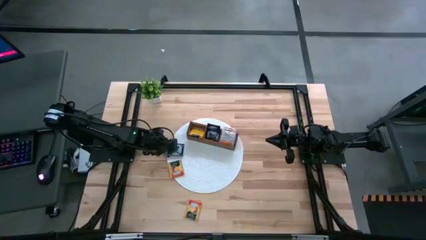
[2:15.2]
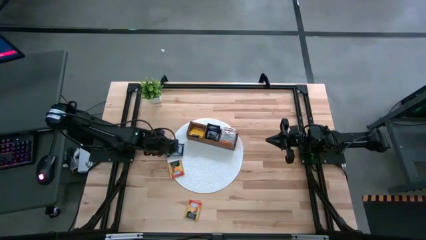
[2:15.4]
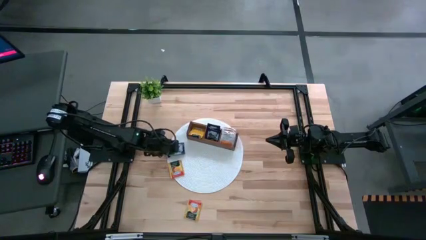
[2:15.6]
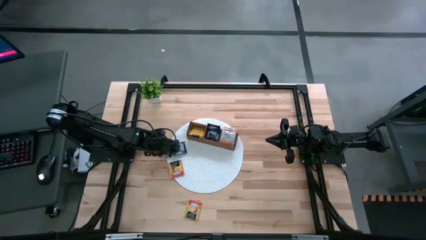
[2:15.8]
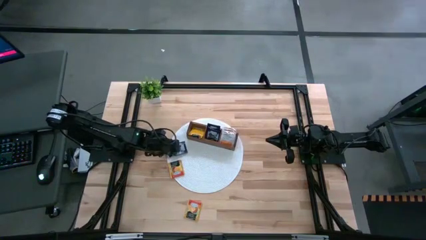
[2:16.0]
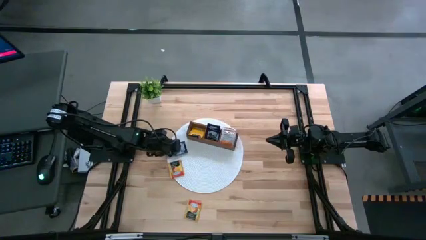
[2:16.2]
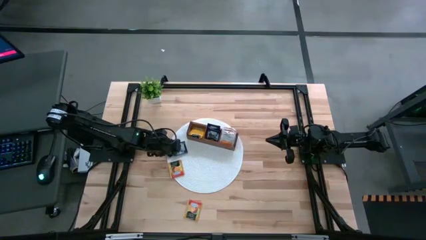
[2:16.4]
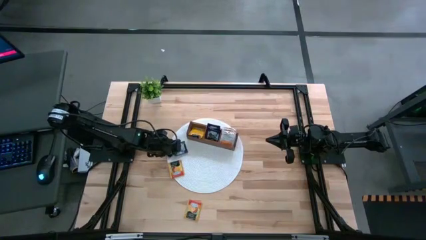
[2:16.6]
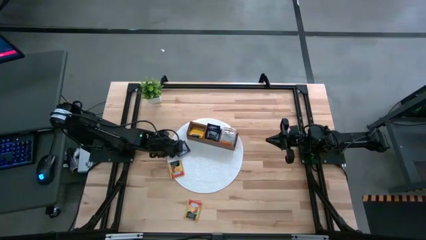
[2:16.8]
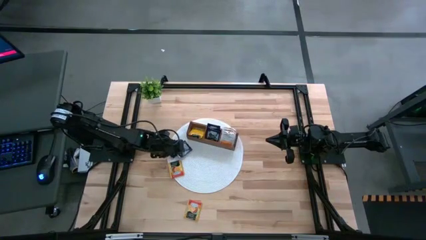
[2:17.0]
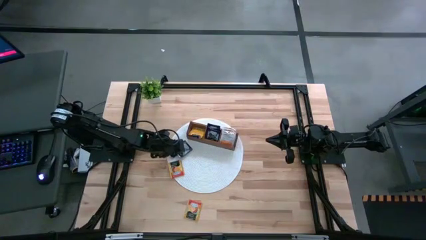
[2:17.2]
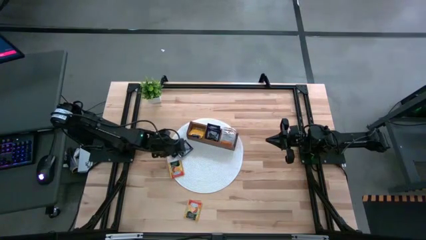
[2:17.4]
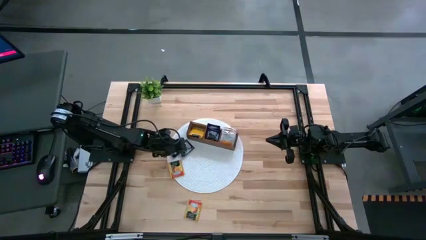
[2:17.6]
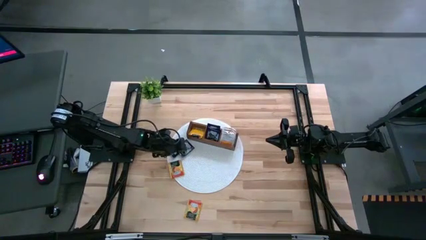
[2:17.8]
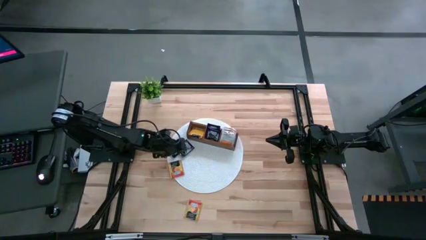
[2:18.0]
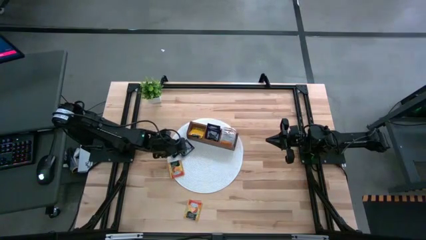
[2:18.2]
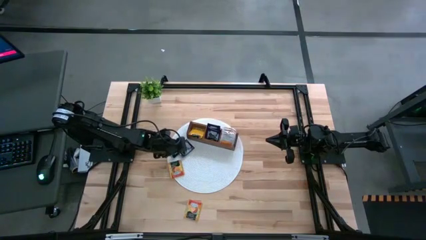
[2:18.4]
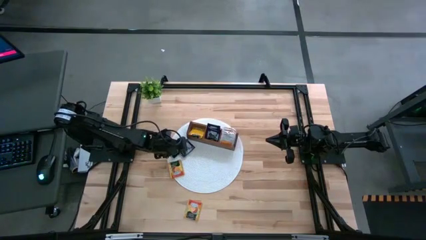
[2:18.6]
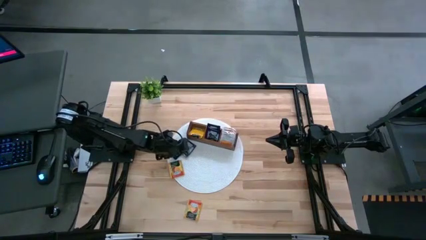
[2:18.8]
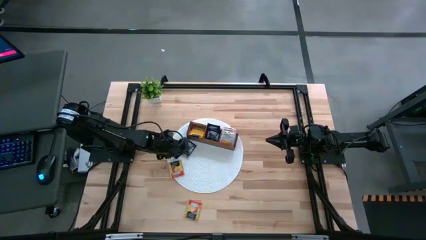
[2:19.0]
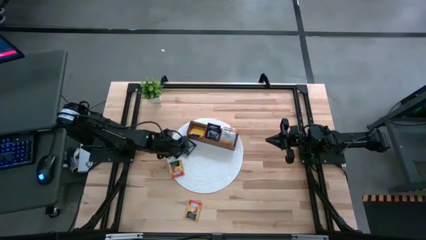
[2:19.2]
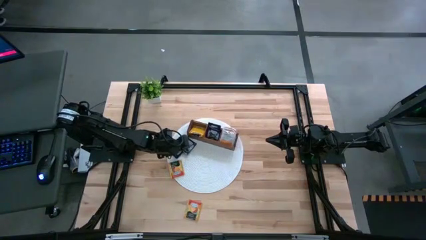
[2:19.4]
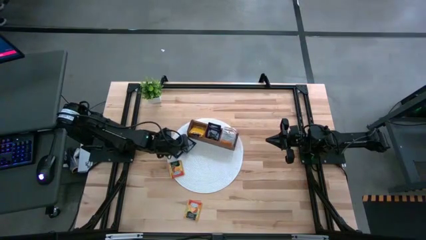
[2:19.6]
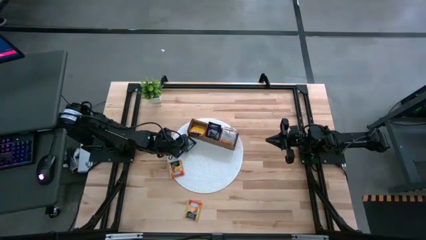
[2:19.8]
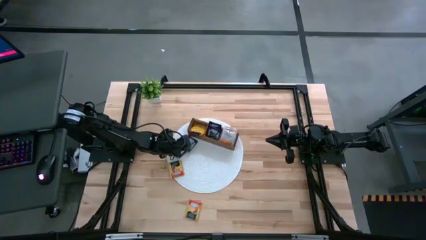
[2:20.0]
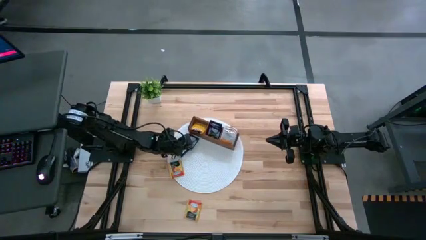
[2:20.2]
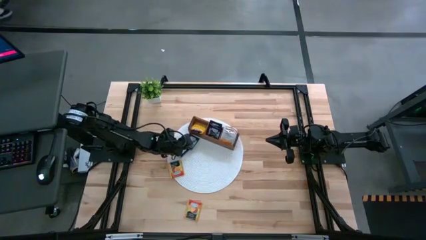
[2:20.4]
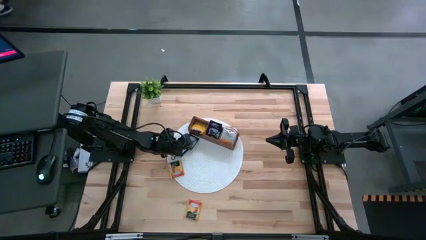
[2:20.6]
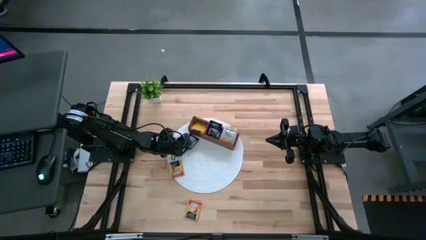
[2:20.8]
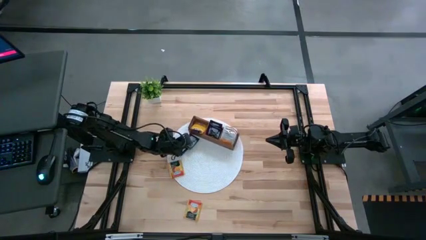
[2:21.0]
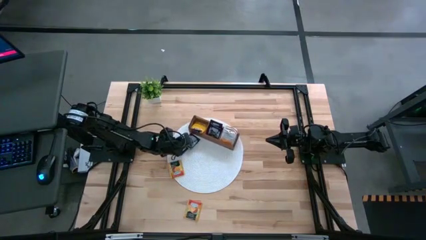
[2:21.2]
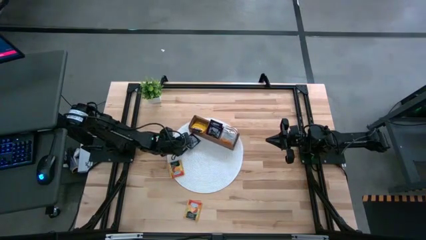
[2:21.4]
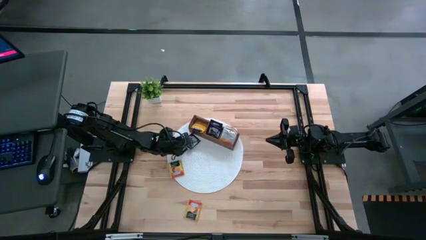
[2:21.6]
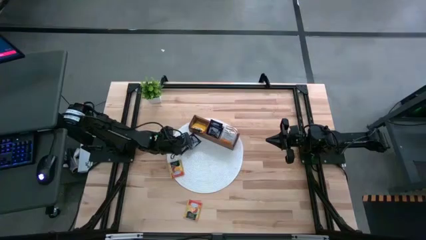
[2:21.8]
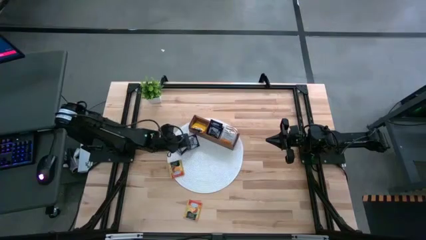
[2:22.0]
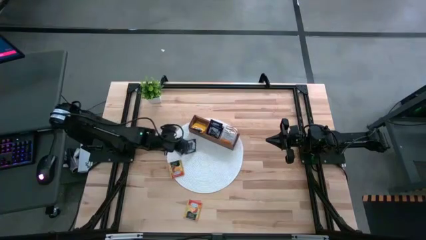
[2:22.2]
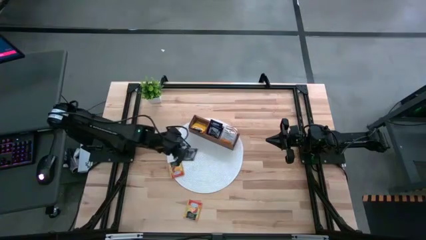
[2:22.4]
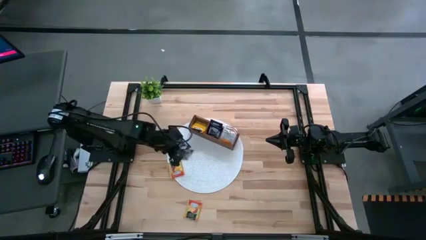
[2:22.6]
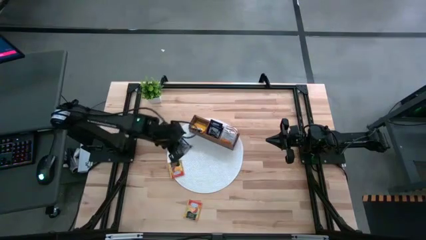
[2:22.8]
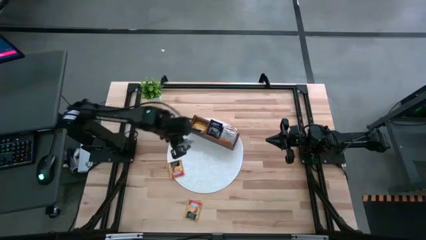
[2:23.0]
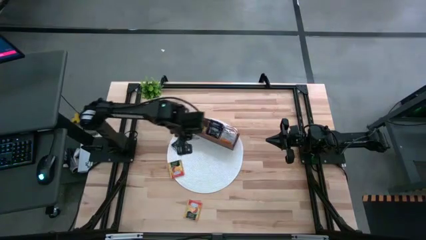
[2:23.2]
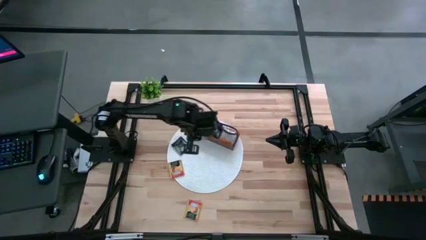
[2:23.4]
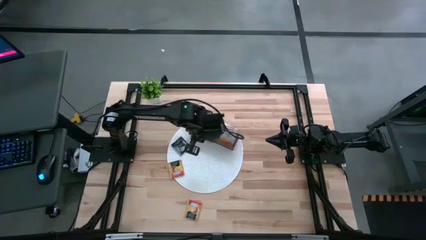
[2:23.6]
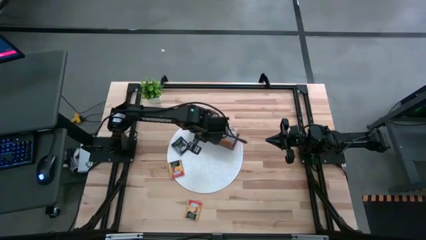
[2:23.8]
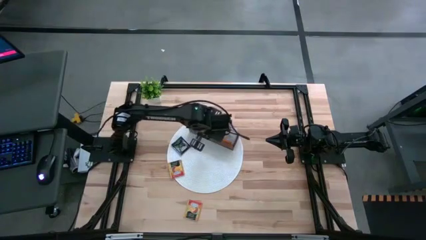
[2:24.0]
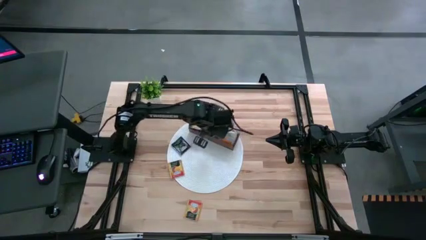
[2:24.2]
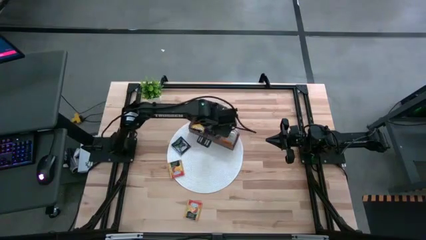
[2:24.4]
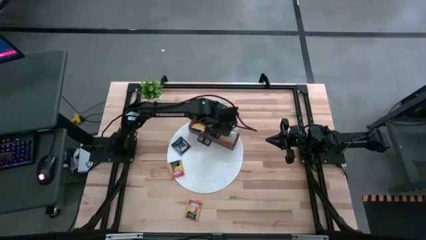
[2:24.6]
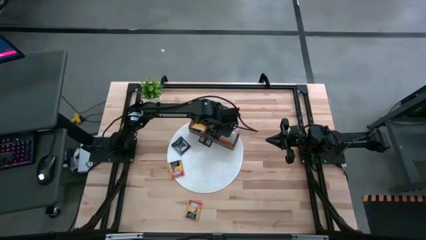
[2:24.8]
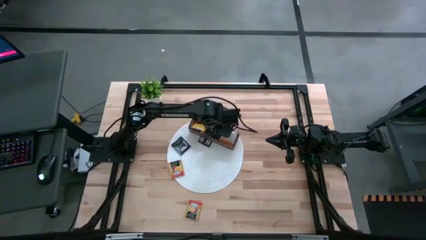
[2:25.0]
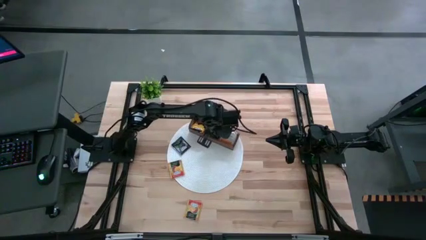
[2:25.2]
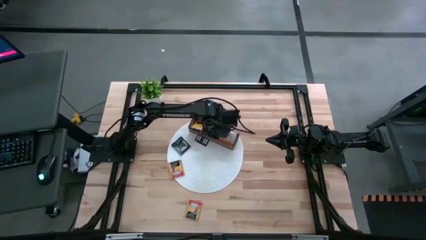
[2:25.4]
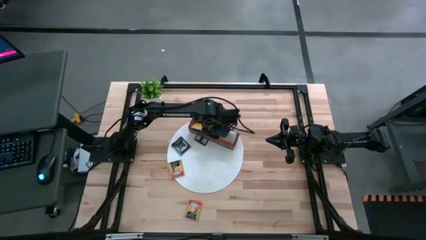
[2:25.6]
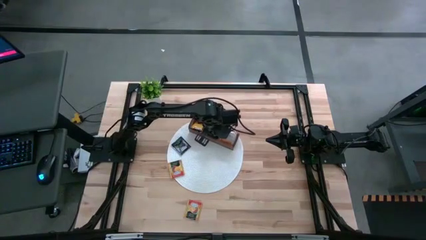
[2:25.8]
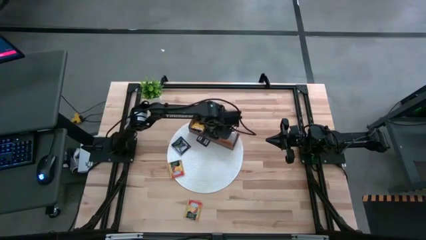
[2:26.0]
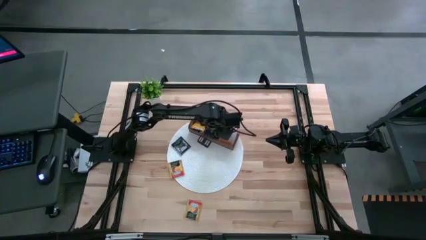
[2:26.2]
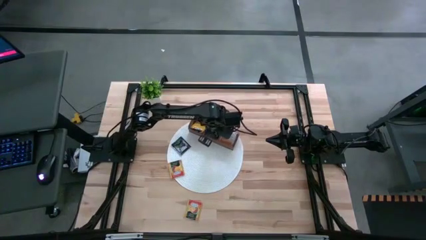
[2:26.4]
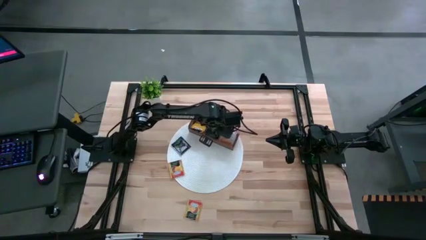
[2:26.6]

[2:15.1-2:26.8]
Task: Pick & Place Tea
Put the blue tea bag into the middle section of the wooden organizer
